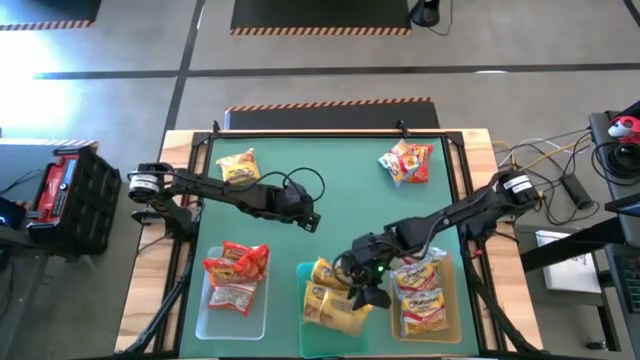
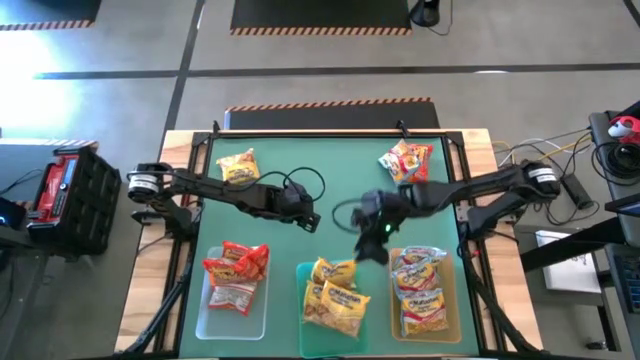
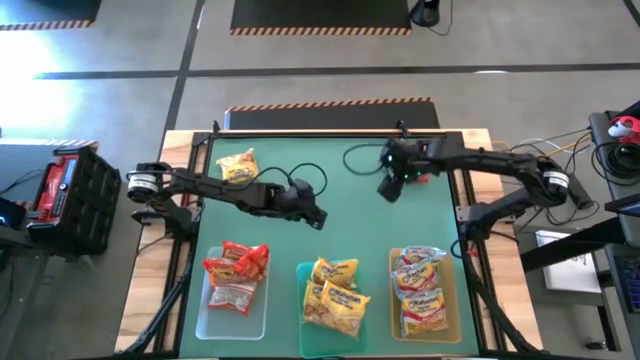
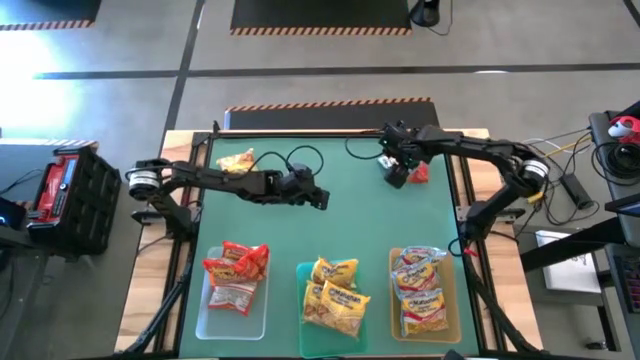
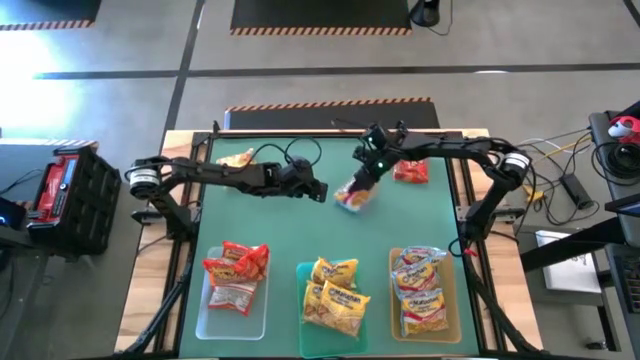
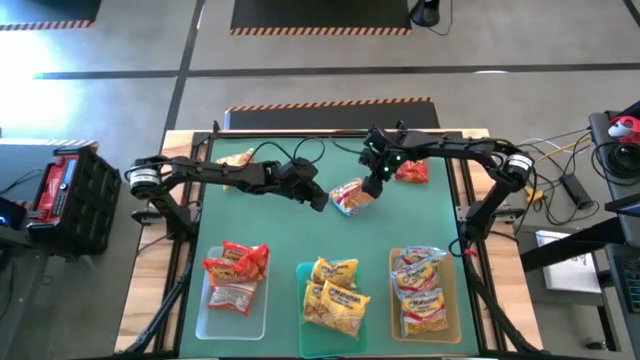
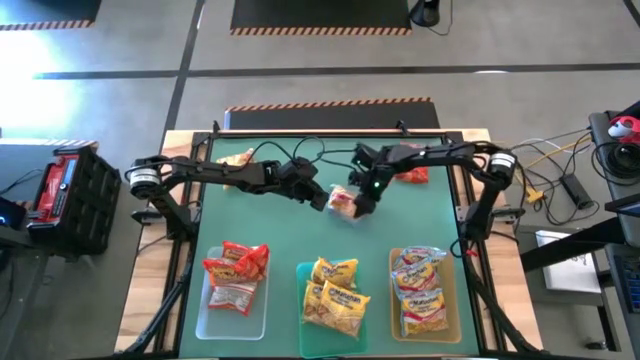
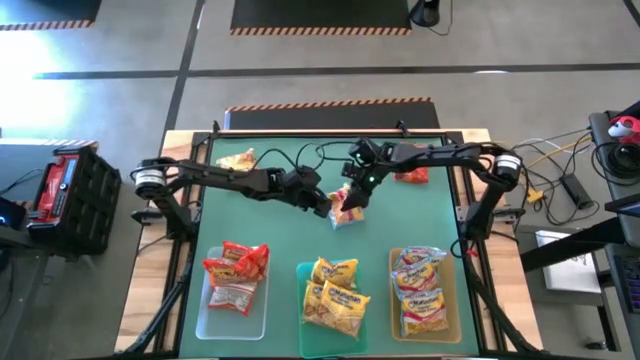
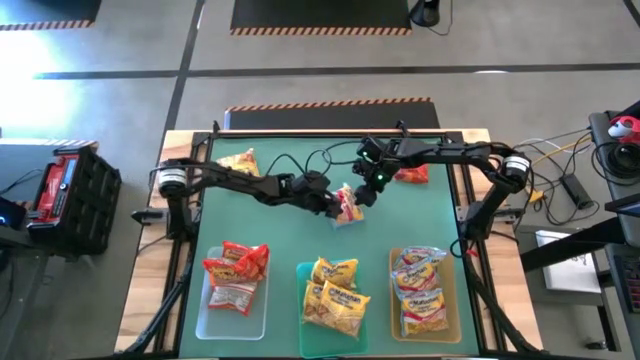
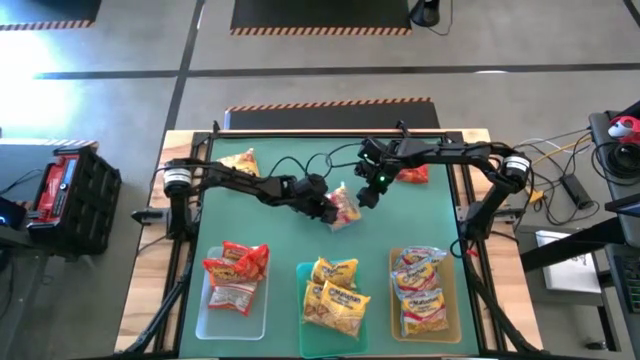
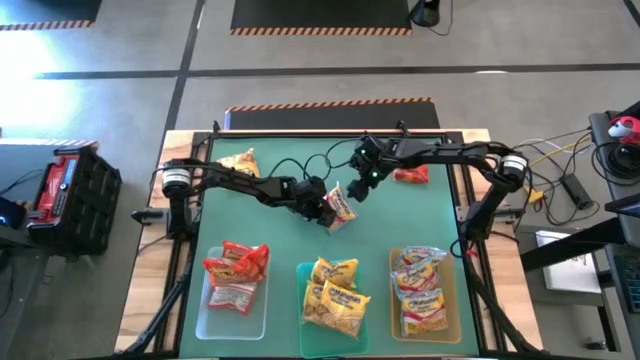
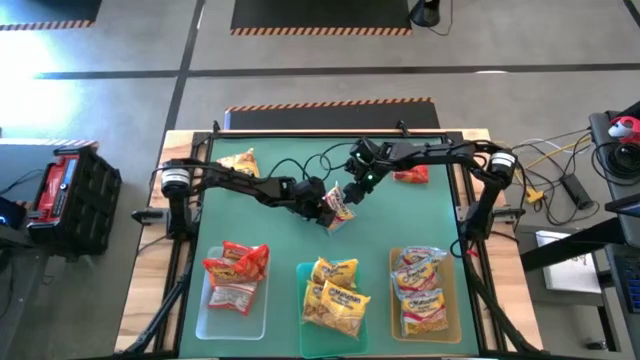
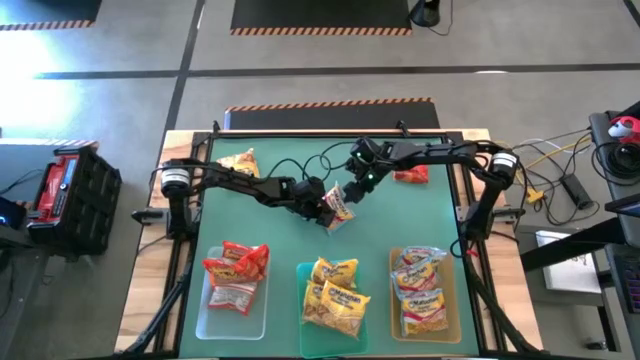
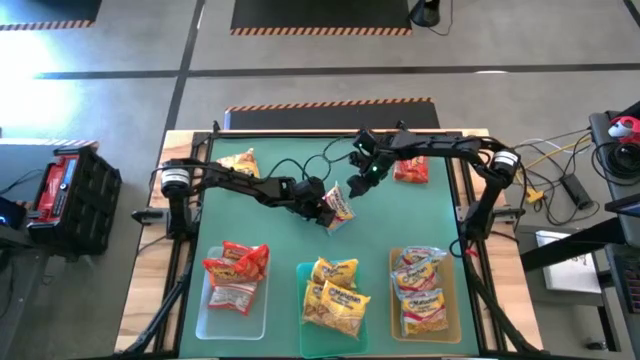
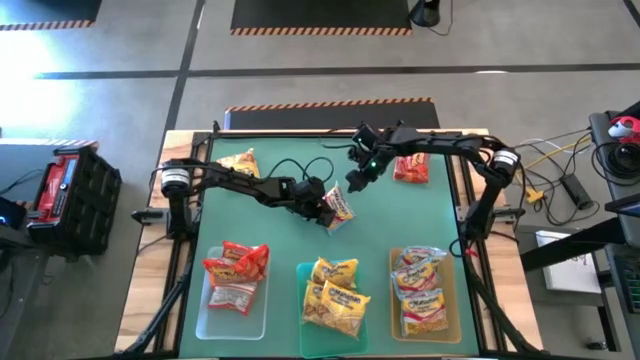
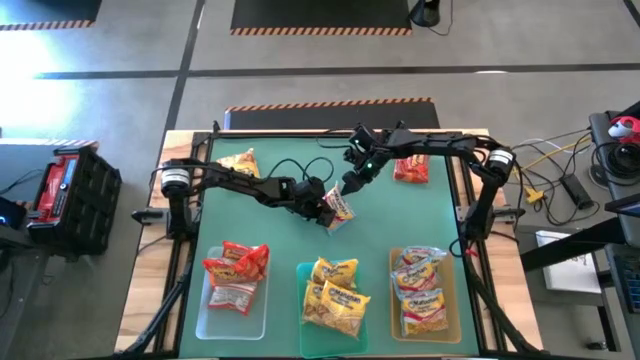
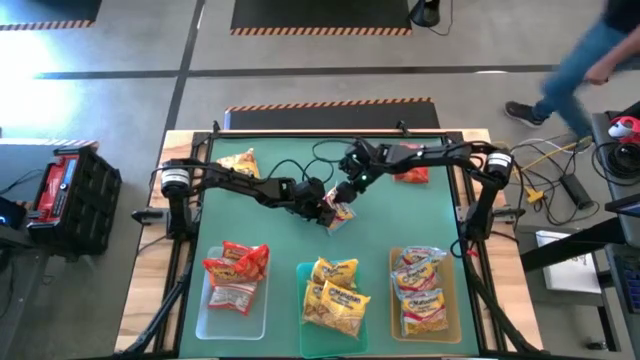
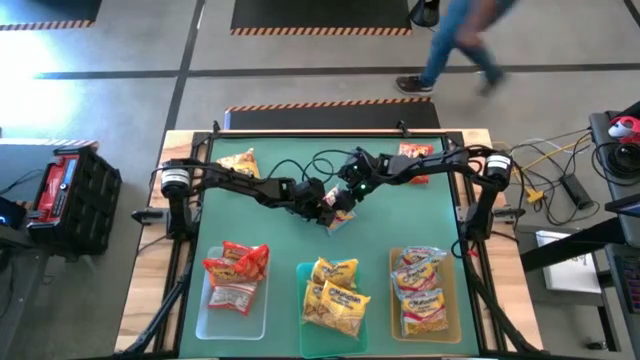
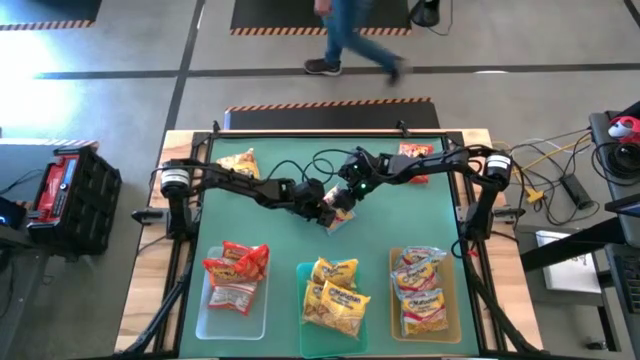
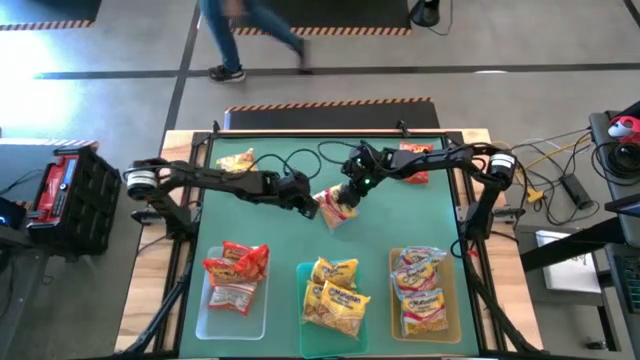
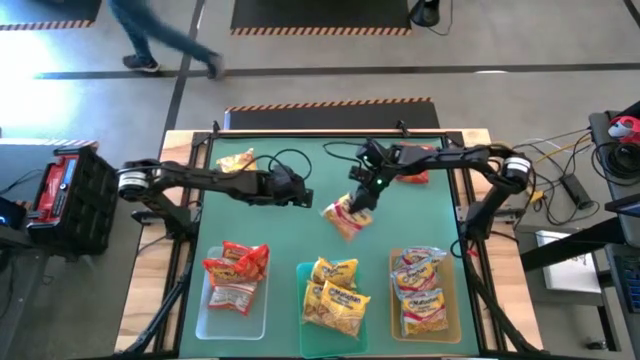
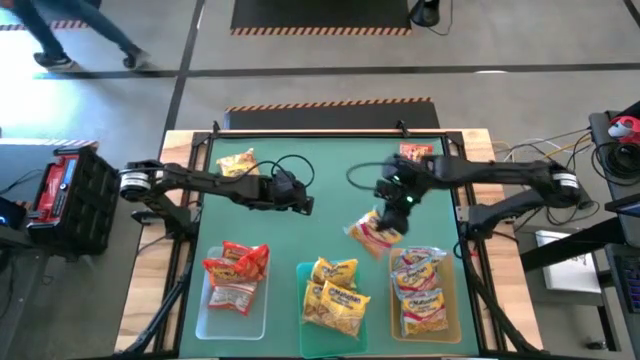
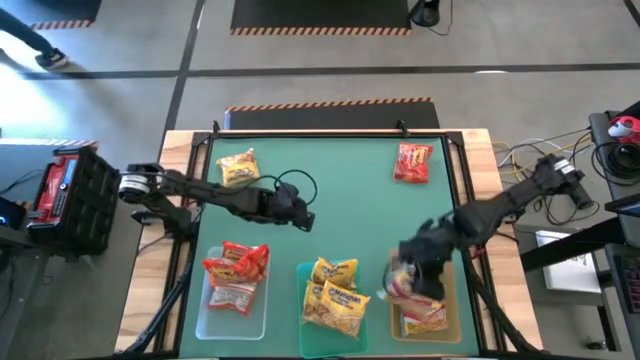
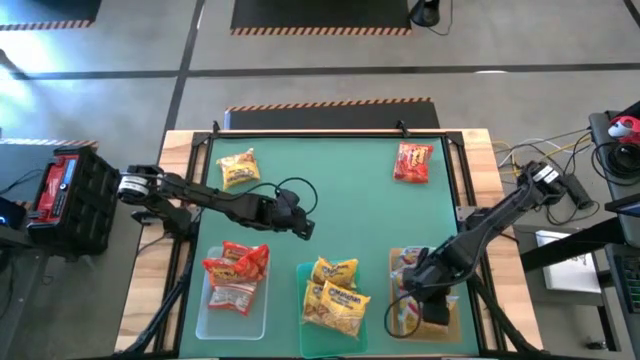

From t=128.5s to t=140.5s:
Task: Sort Maruchan noodles
Put the blue noodle pack into the yellow bin

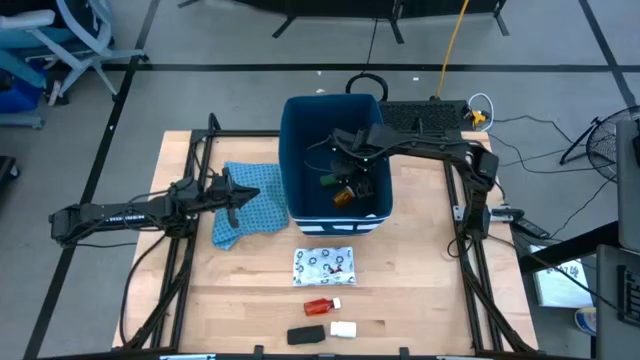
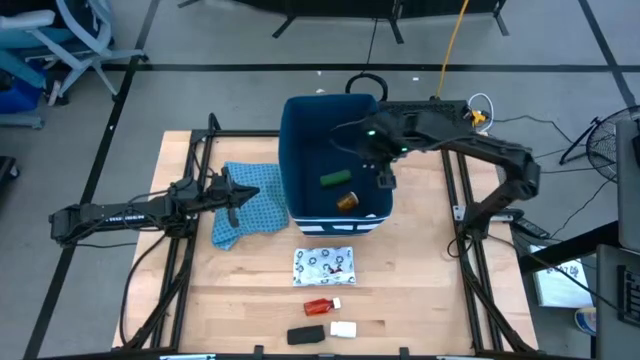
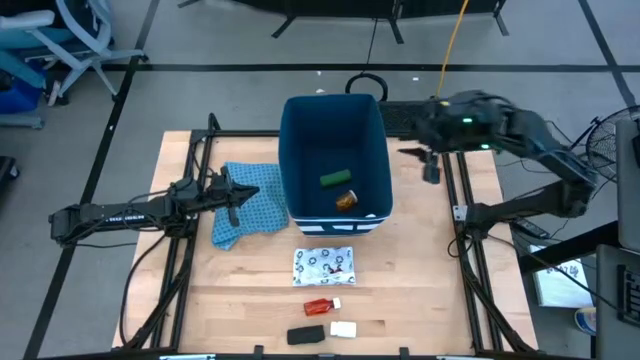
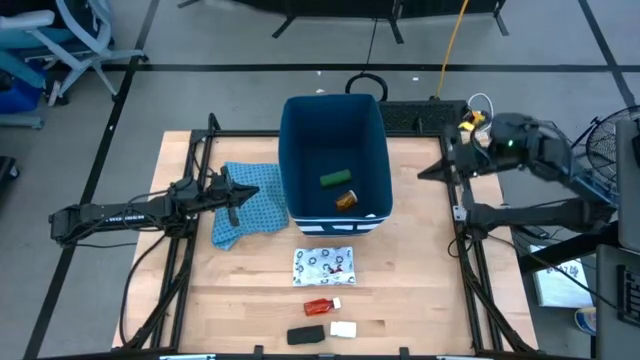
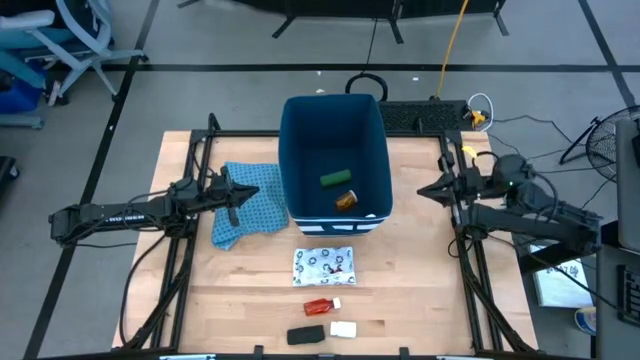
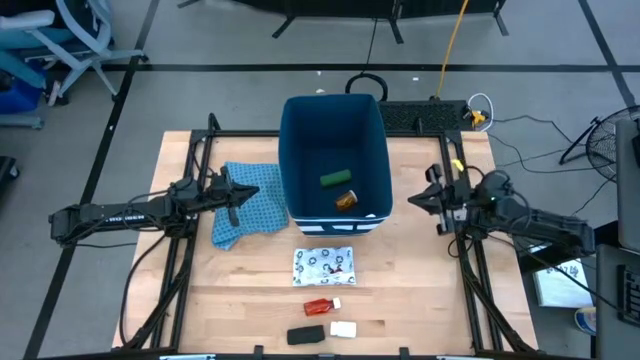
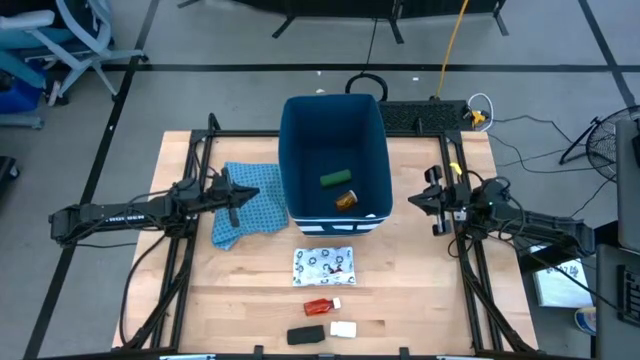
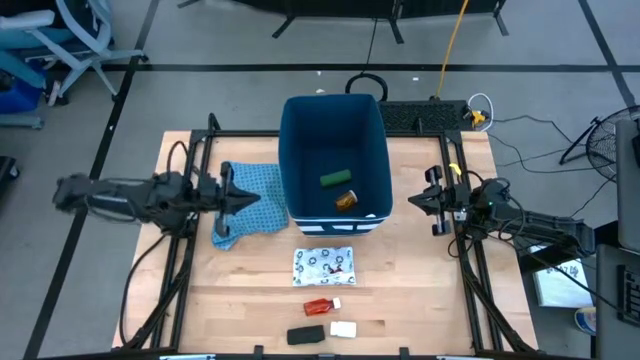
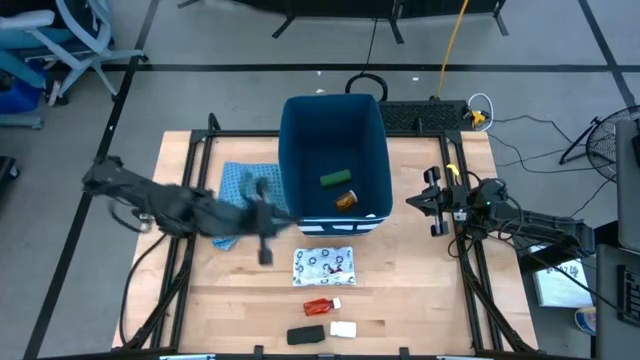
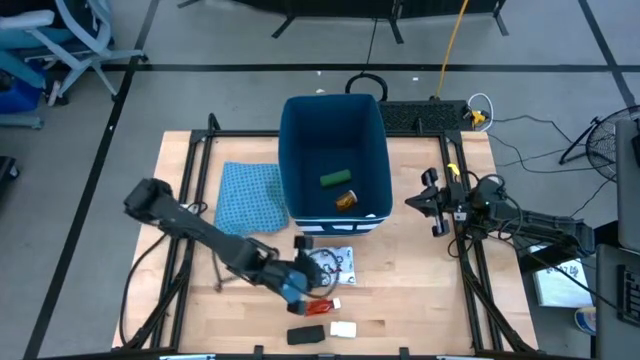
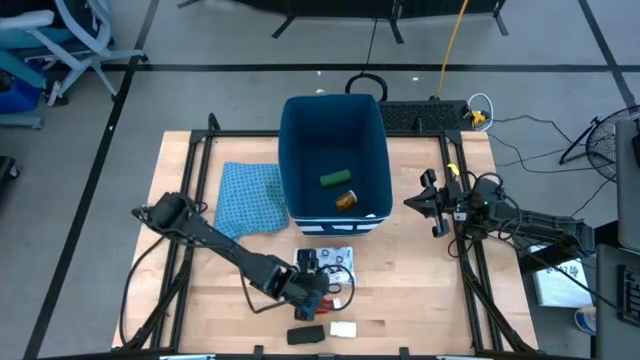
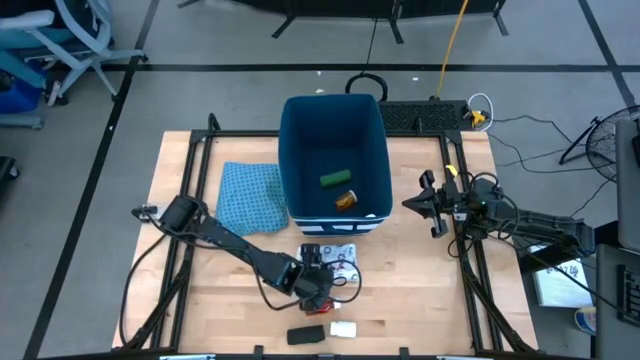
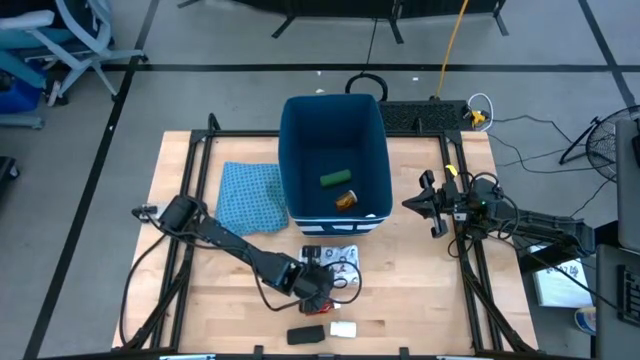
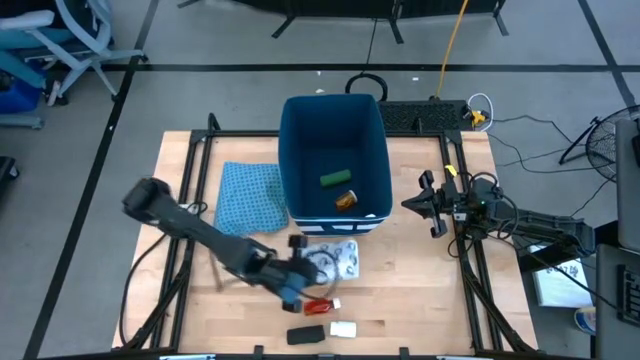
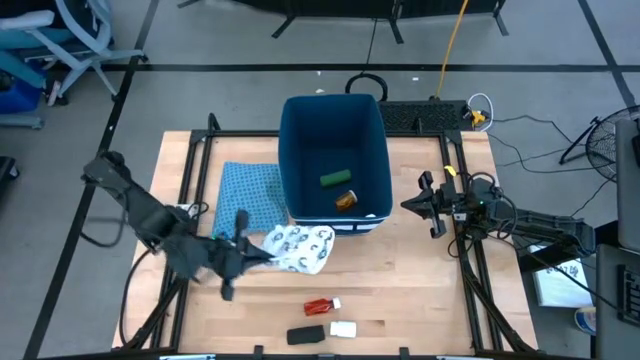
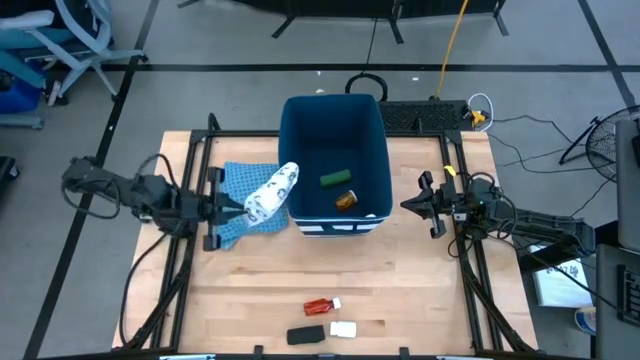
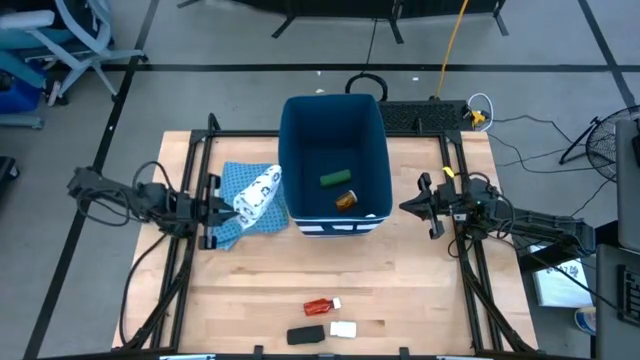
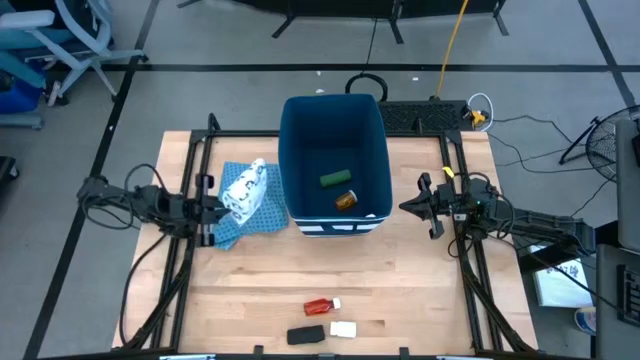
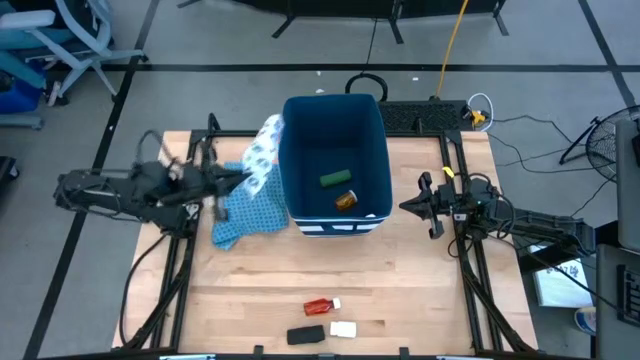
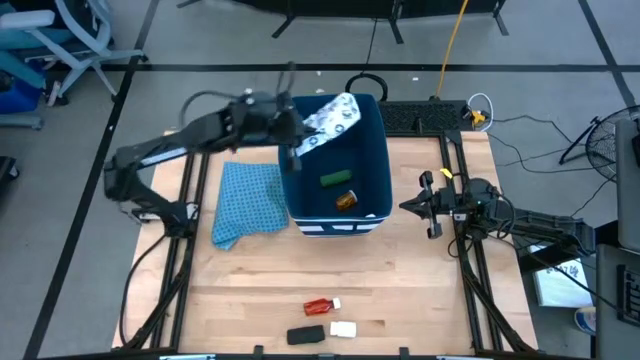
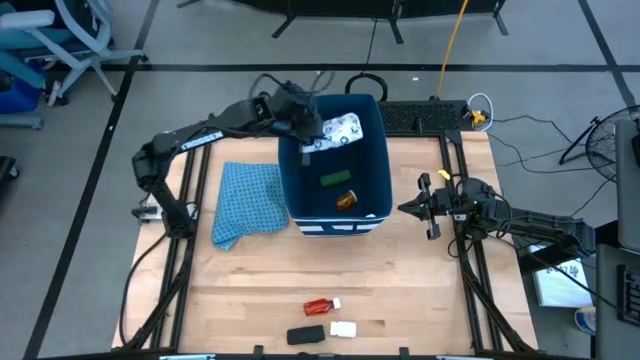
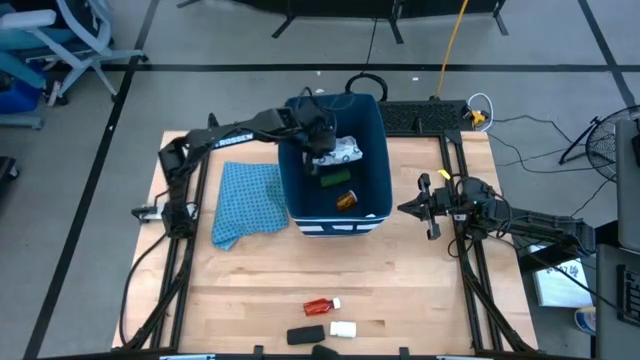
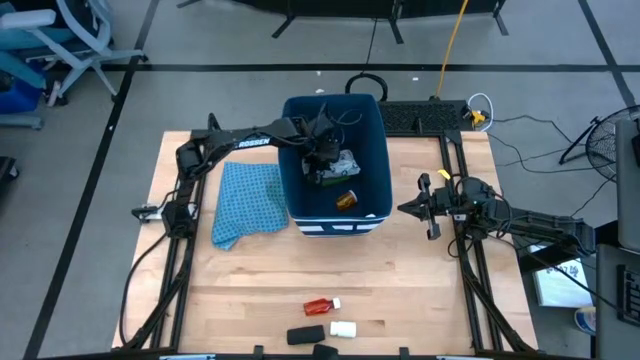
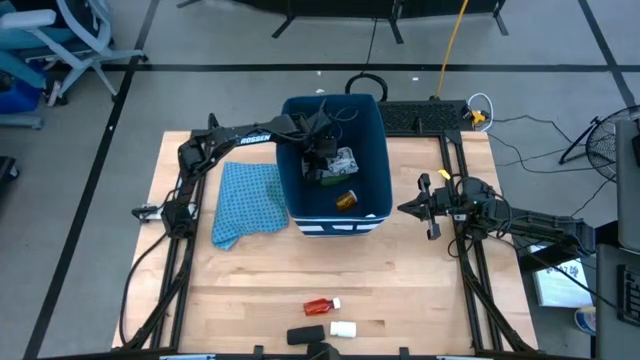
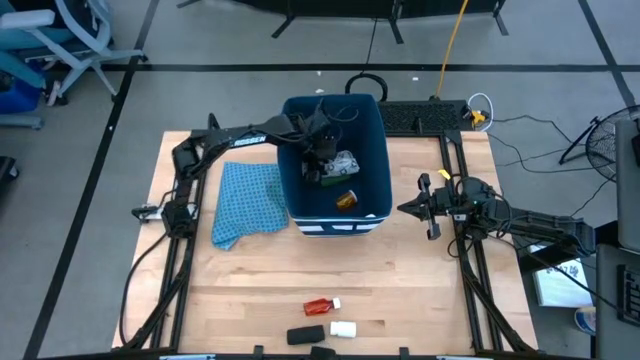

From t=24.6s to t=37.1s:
Task: Pick & place medical supplies in basket/bin
Put the white mailer bag into the blue bin
